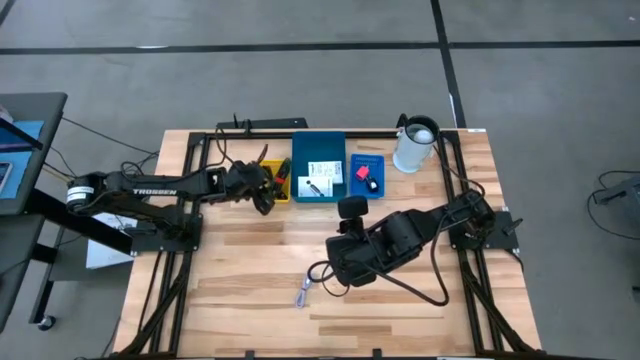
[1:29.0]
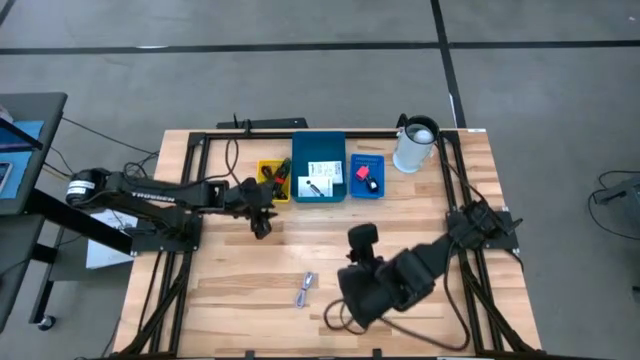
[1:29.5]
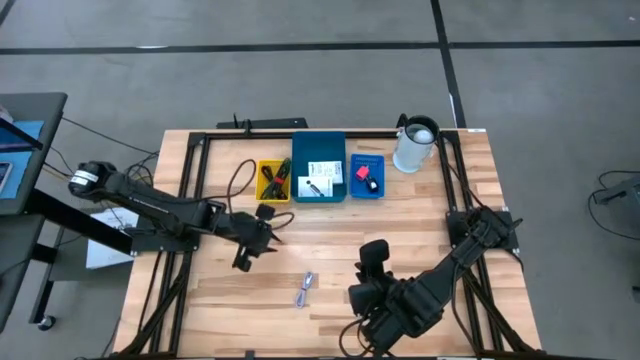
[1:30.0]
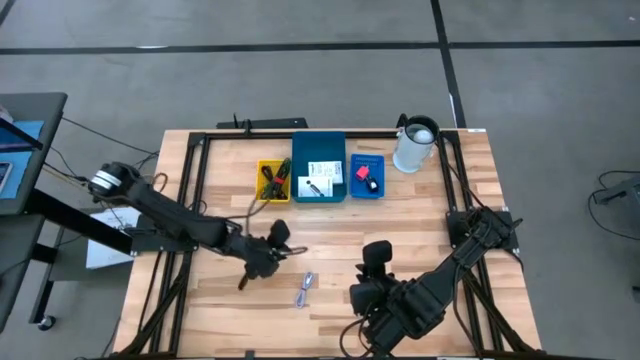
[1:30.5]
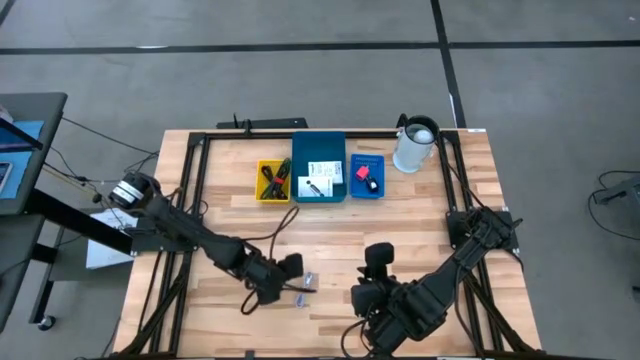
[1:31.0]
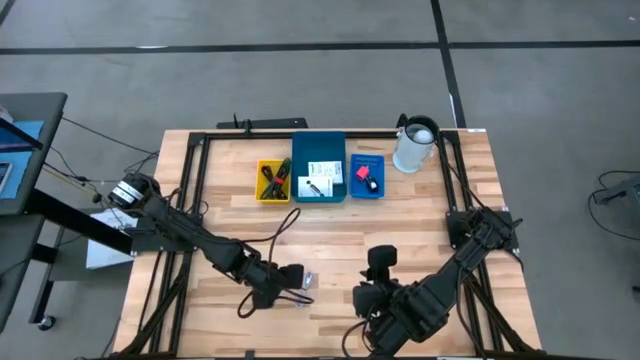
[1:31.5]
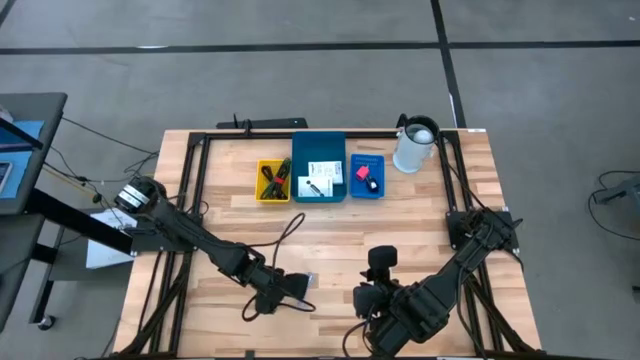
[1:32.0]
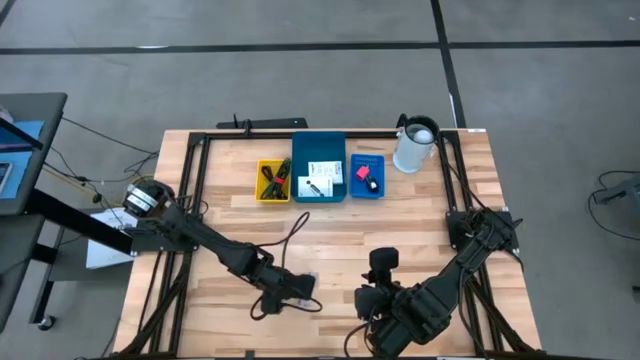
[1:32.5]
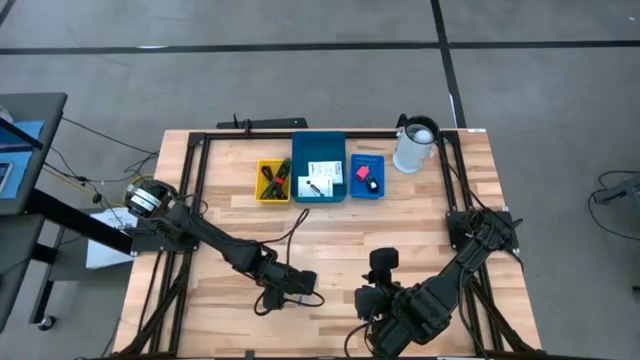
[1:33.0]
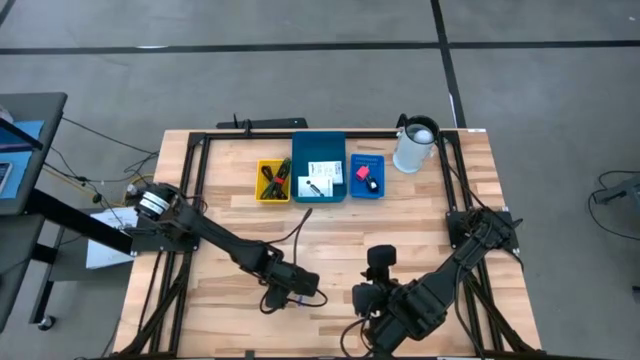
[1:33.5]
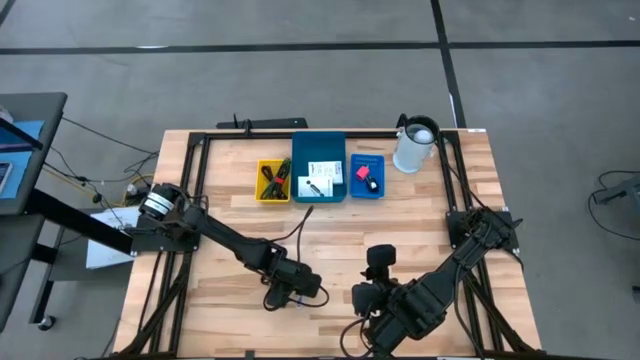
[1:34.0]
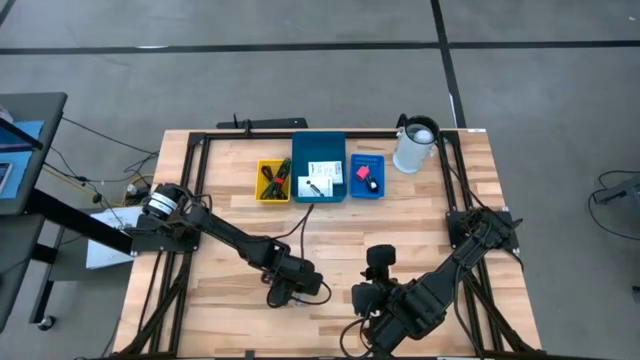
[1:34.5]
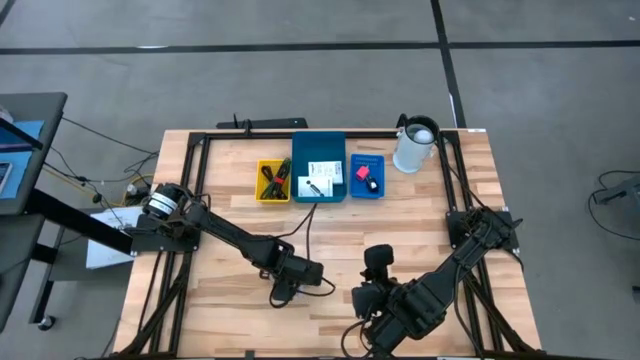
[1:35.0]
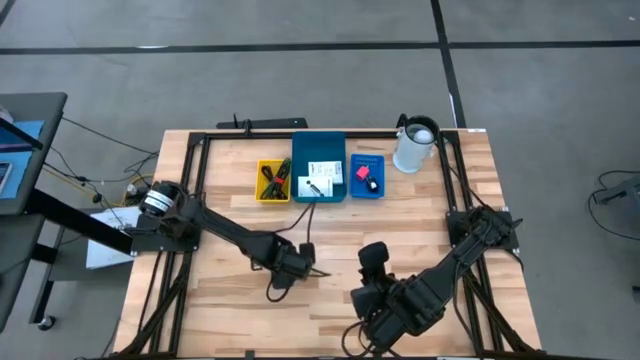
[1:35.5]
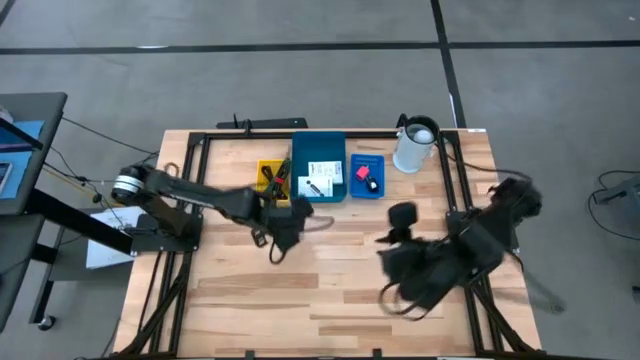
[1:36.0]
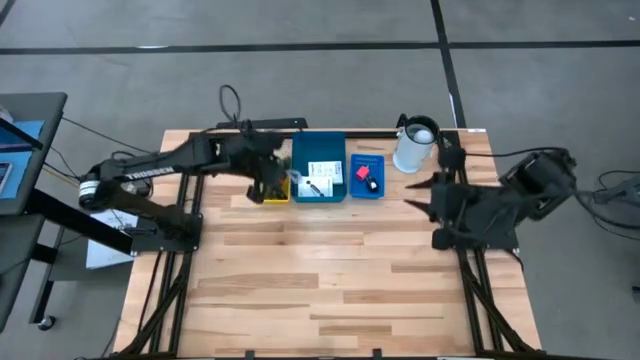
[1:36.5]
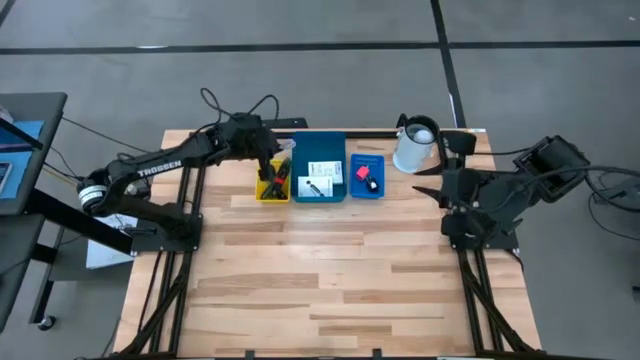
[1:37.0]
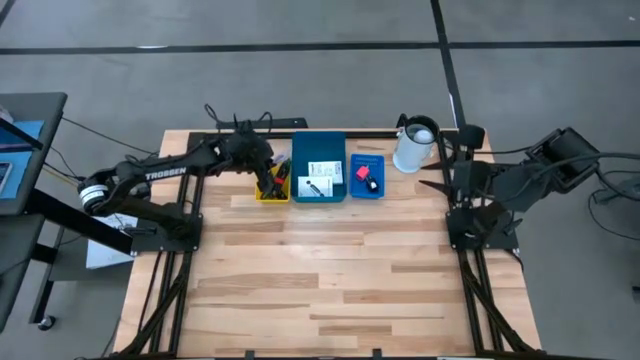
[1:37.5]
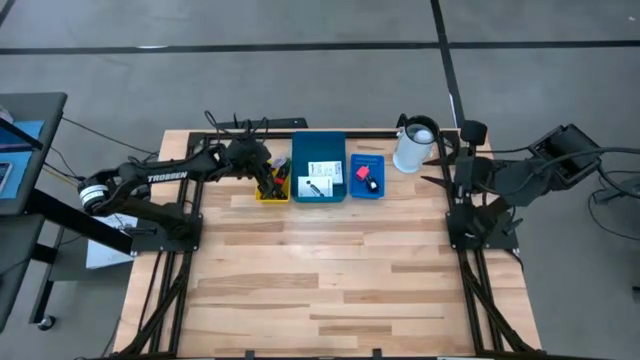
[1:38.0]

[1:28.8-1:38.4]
Task: Pick and place items into bin
Put the white charger cable into the yellow bin

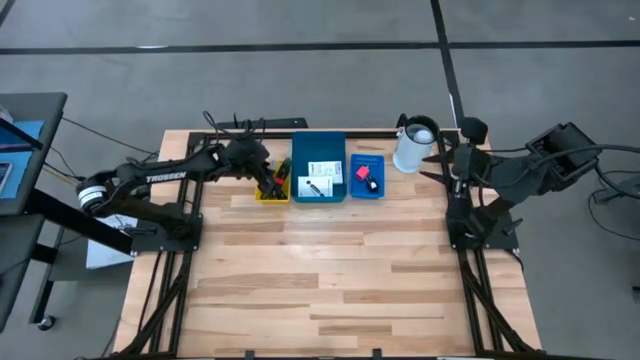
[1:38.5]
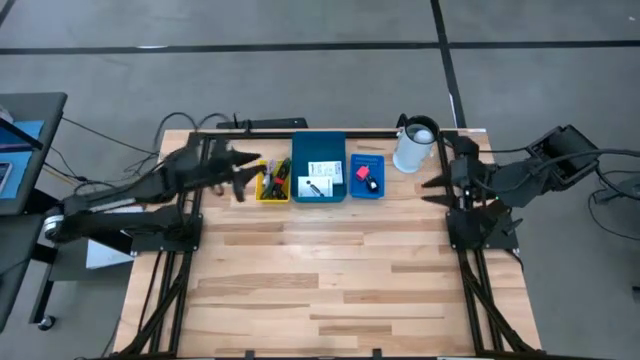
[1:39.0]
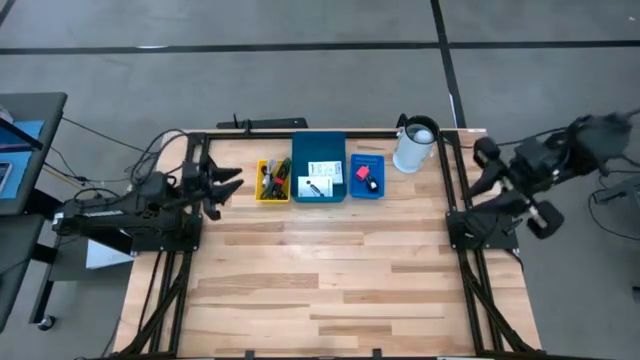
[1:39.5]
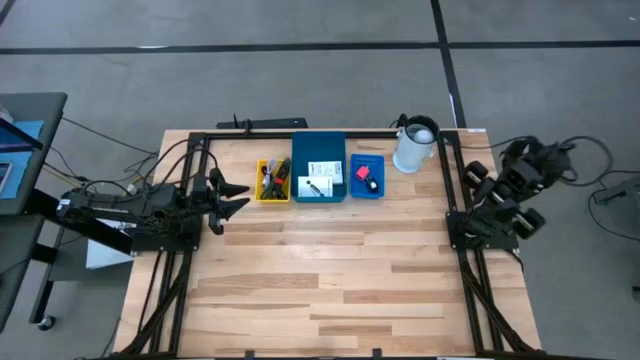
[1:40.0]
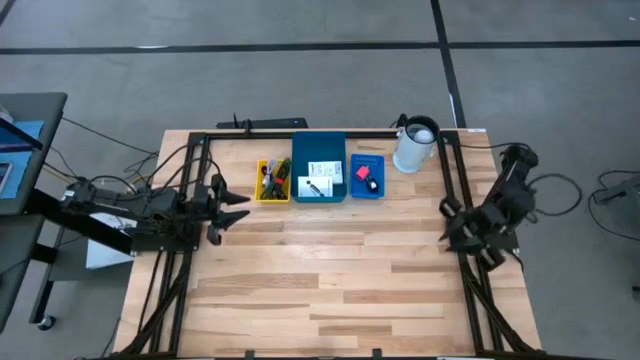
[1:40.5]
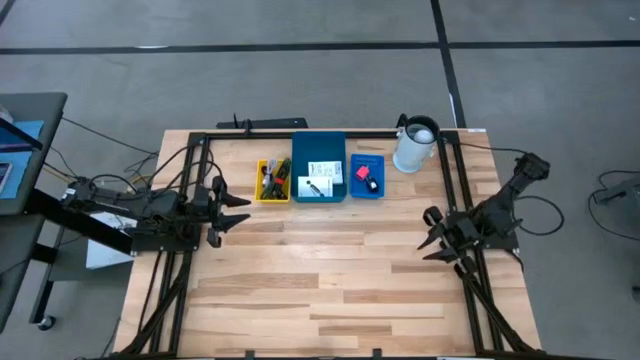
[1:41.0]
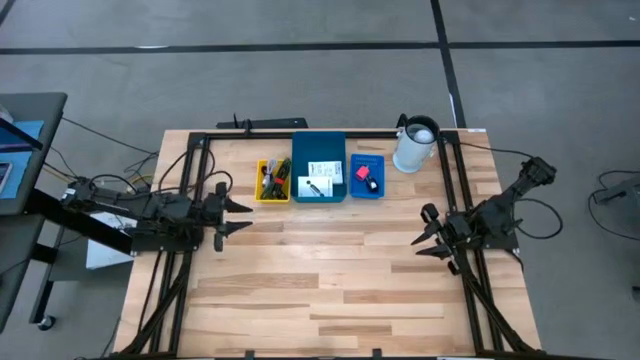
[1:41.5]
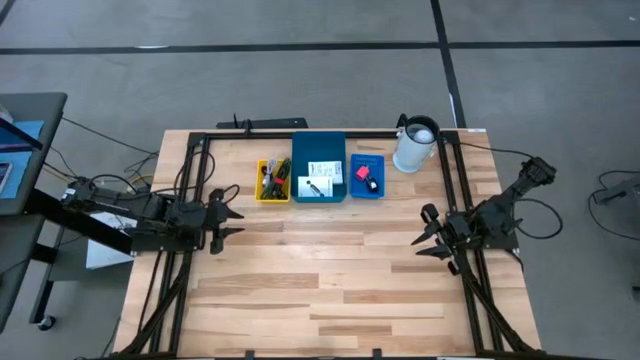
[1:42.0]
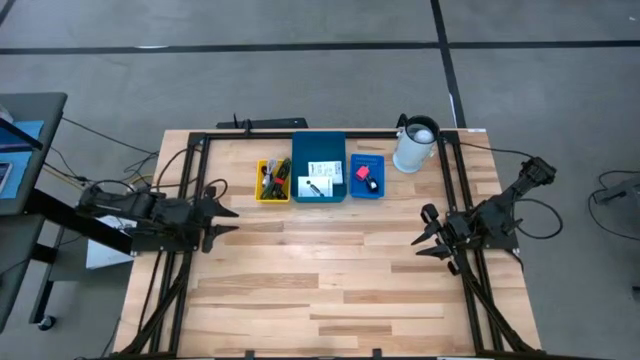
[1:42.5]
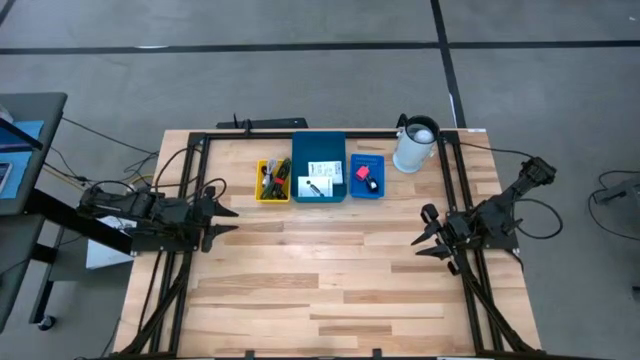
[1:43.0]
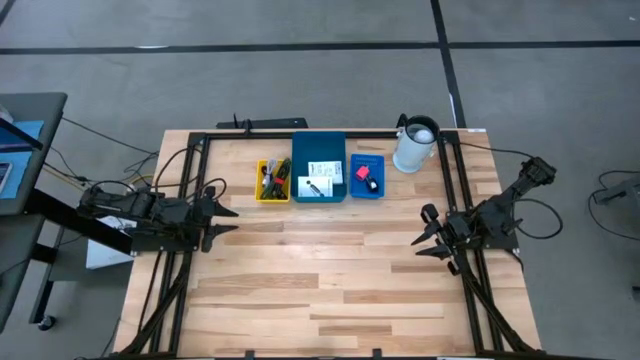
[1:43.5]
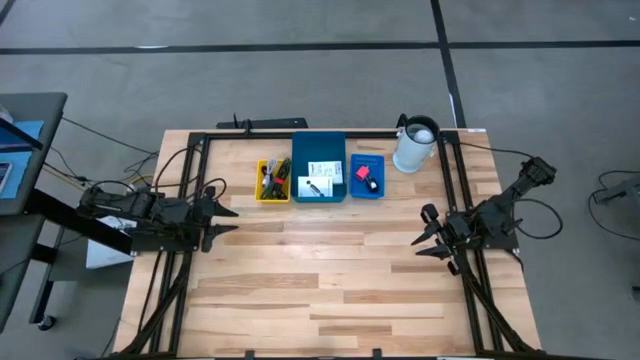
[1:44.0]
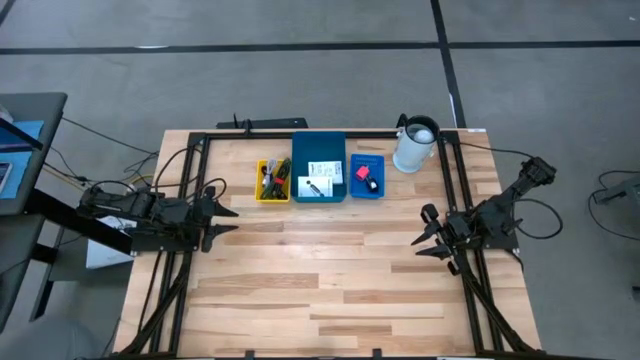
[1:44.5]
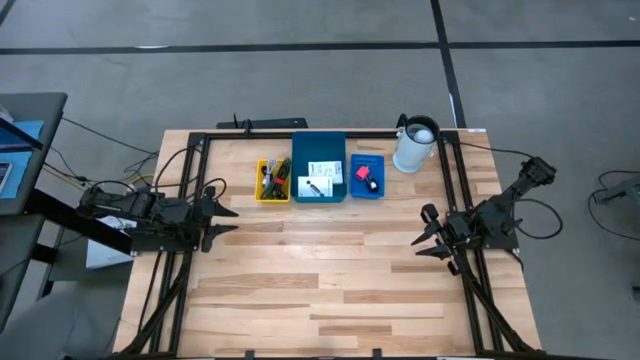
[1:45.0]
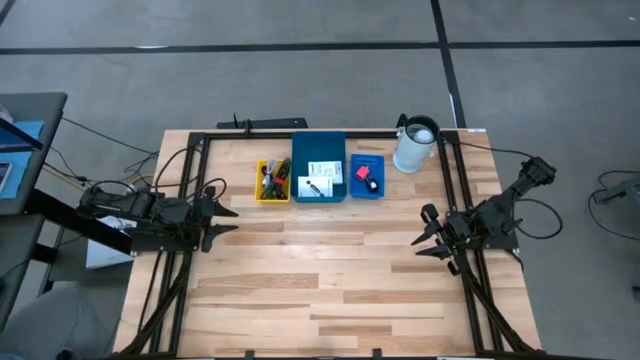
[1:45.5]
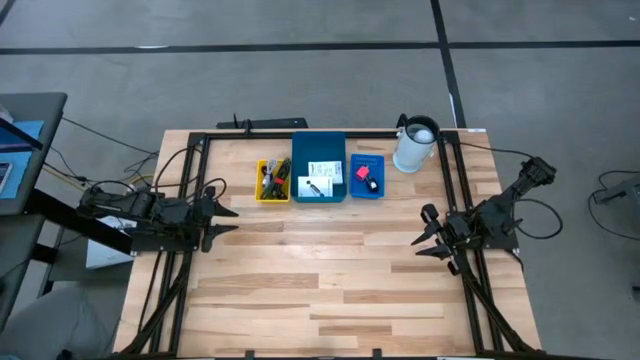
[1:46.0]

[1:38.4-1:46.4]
Return to Home Position

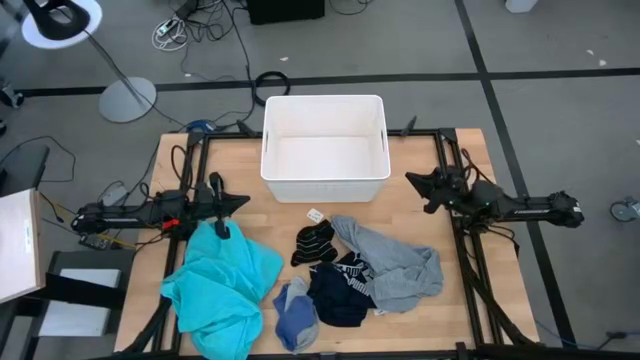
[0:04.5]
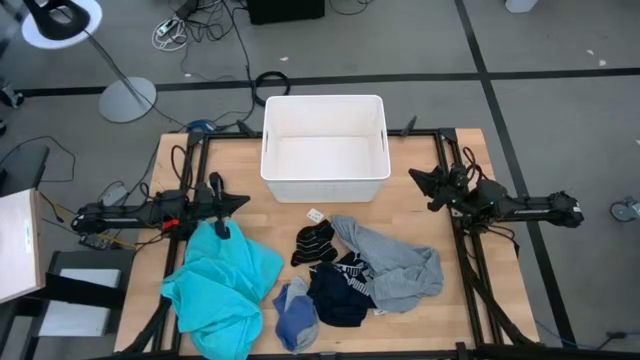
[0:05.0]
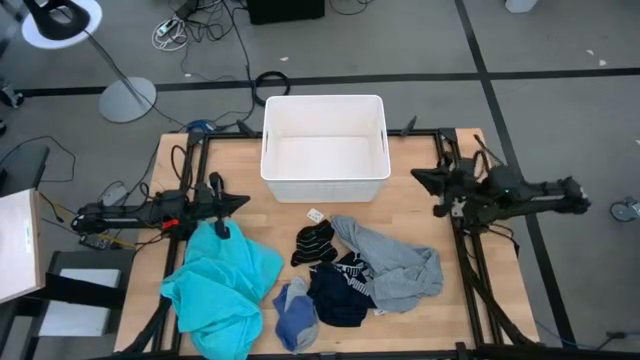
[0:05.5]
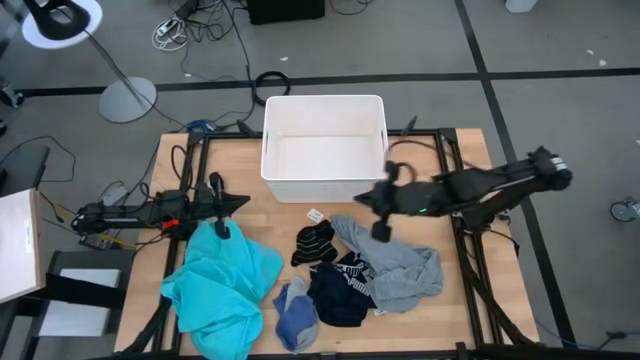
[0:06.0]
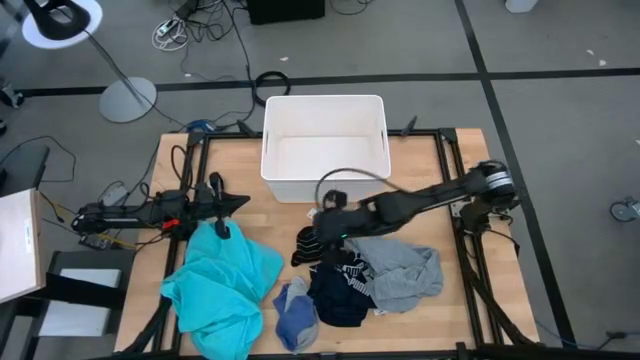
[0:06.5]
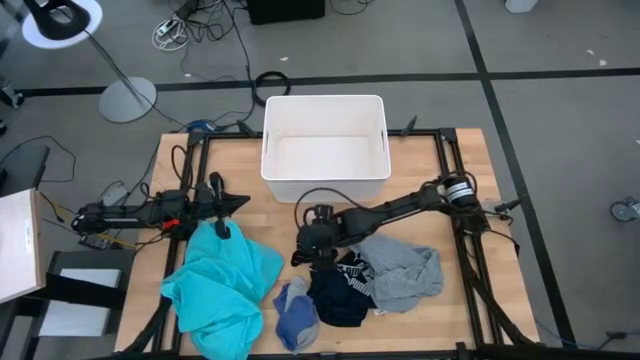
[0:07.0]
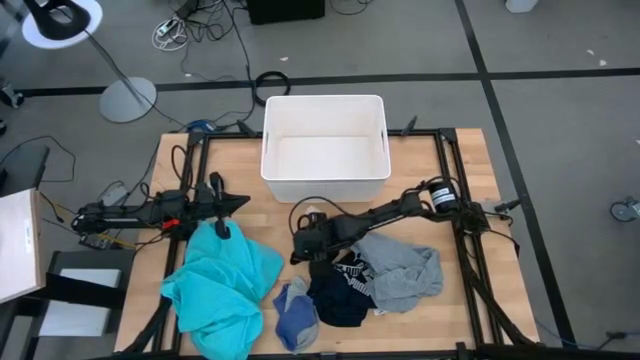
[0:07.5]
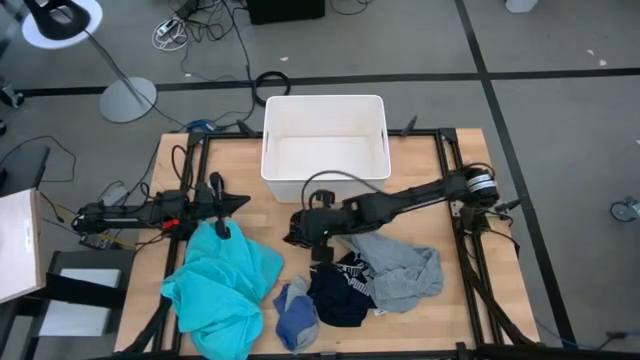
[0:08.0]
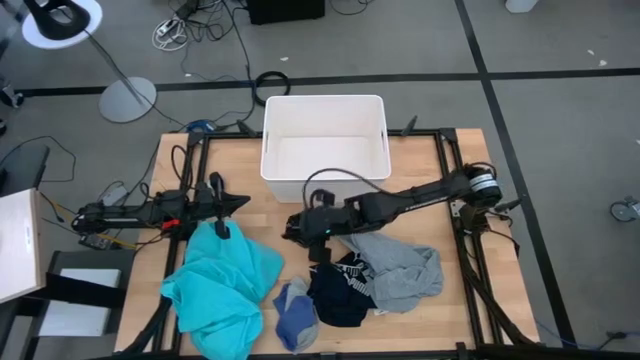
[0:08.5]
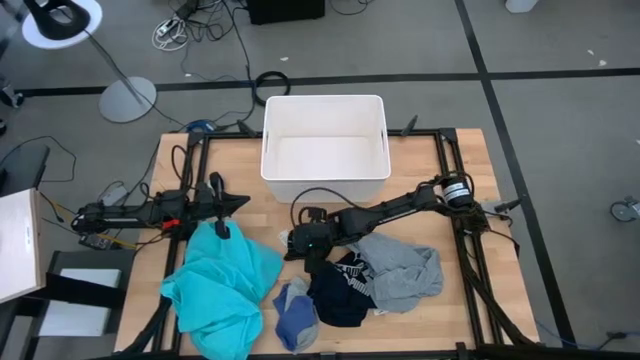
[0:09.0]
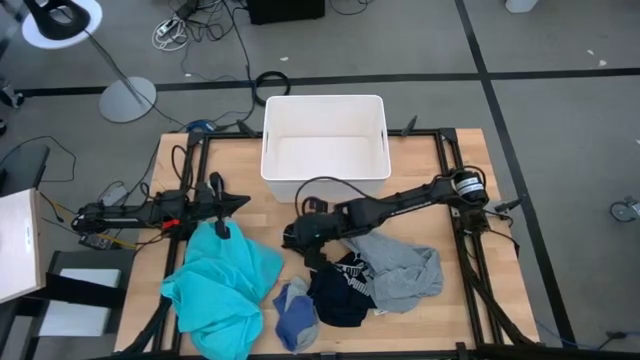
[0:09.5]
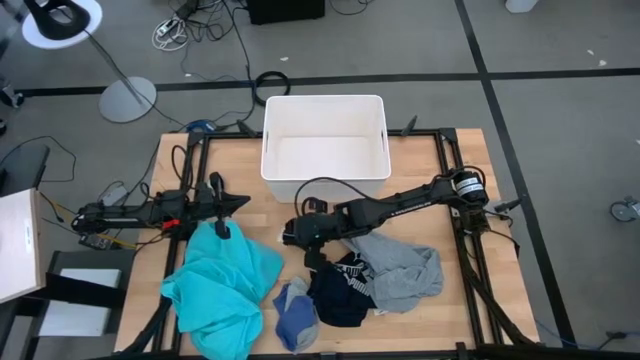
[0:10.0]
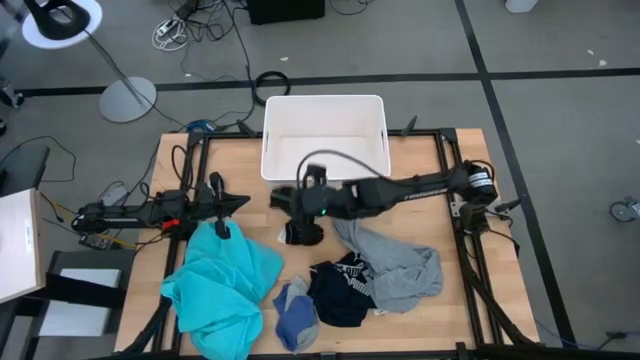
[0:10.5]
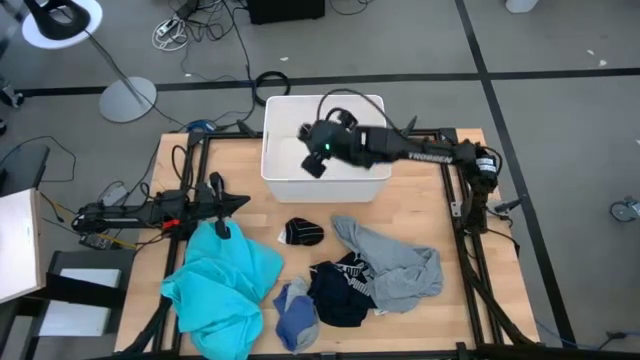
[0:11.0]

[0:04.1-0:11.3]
Task: Sort clothes
Put the black sock into the laundry bin
